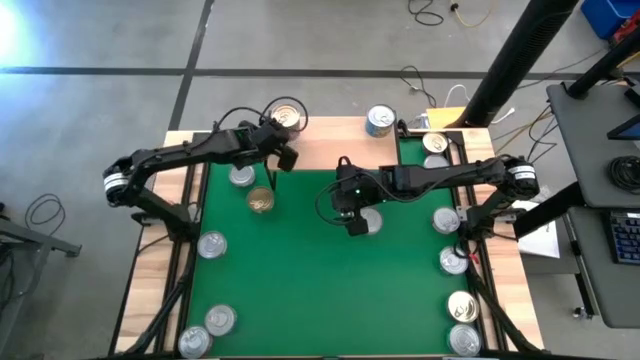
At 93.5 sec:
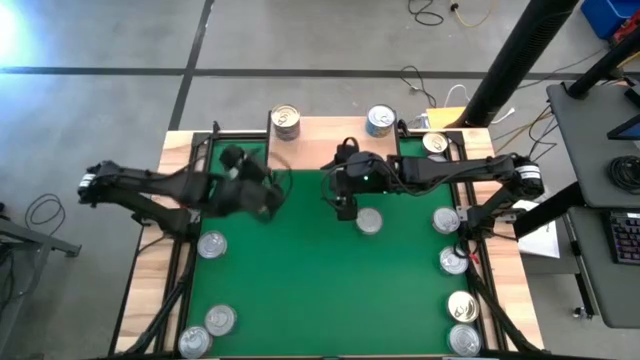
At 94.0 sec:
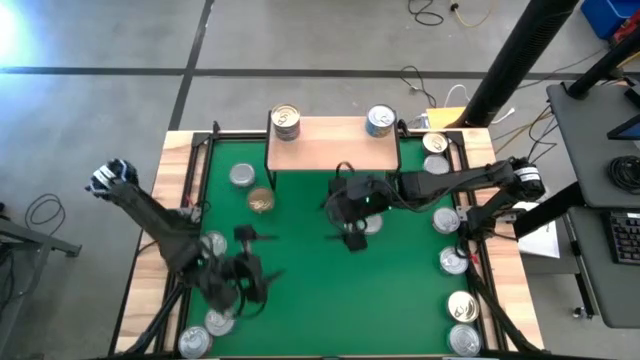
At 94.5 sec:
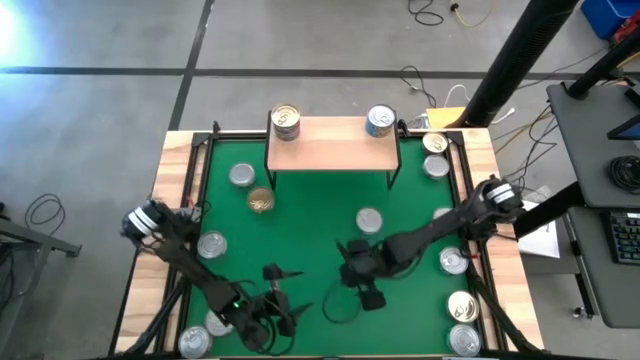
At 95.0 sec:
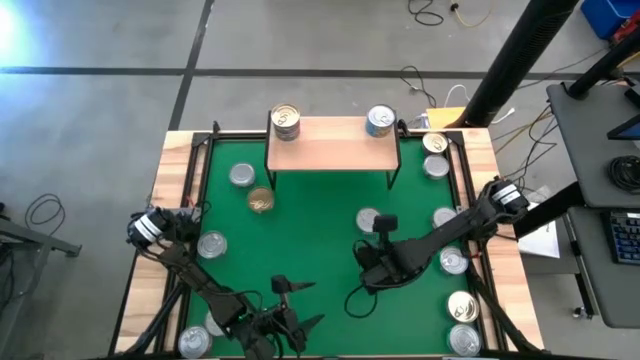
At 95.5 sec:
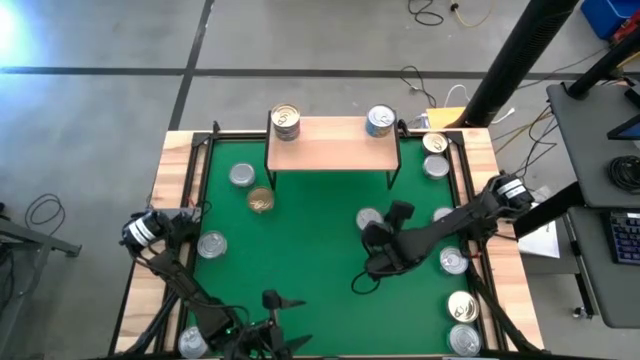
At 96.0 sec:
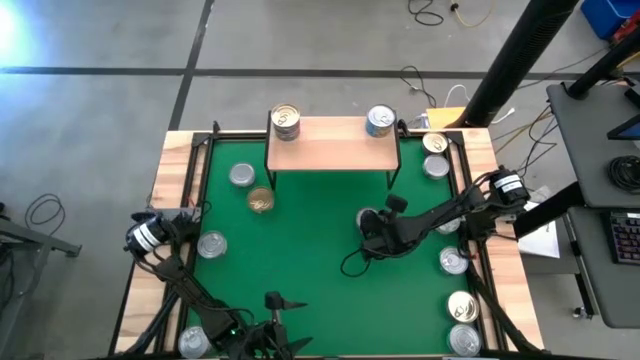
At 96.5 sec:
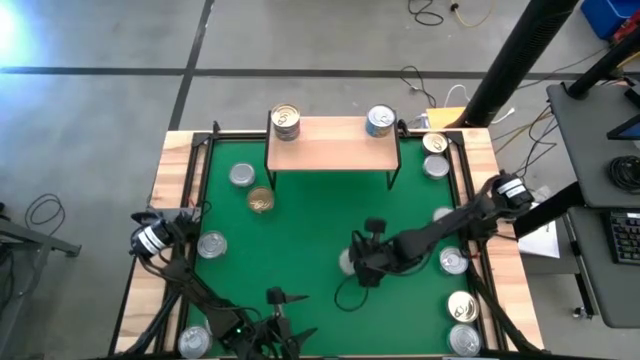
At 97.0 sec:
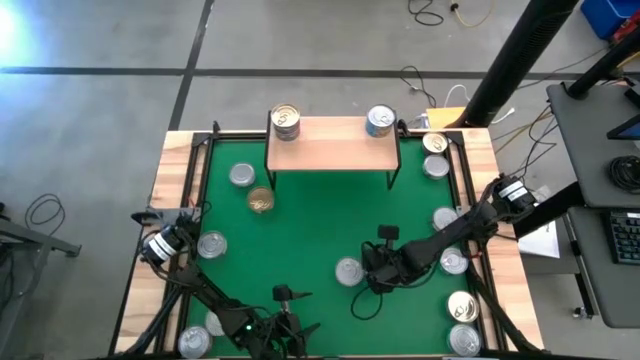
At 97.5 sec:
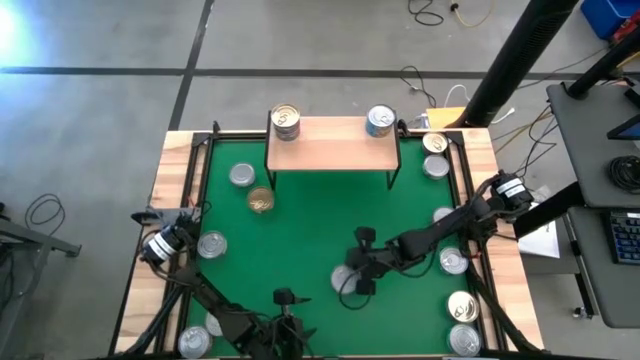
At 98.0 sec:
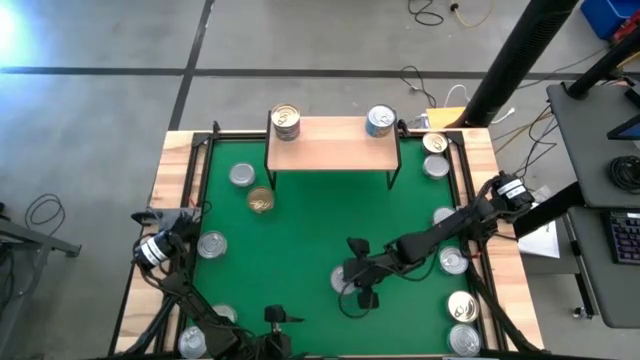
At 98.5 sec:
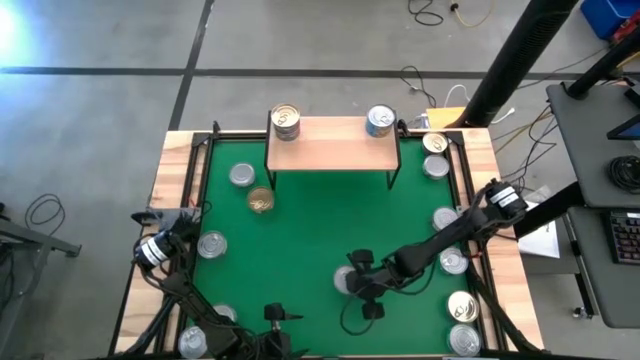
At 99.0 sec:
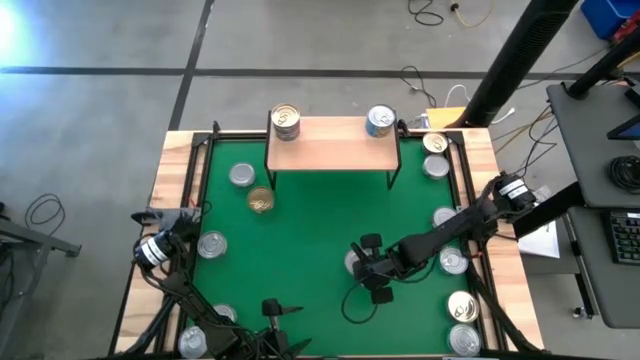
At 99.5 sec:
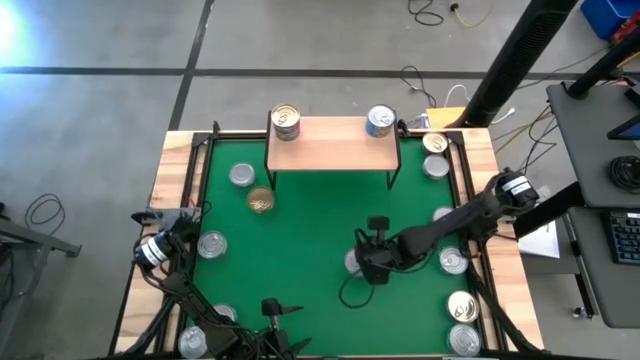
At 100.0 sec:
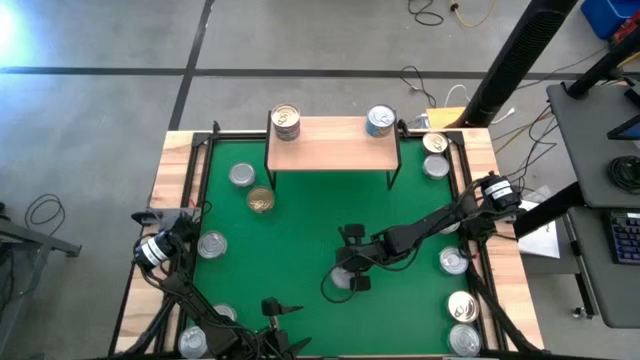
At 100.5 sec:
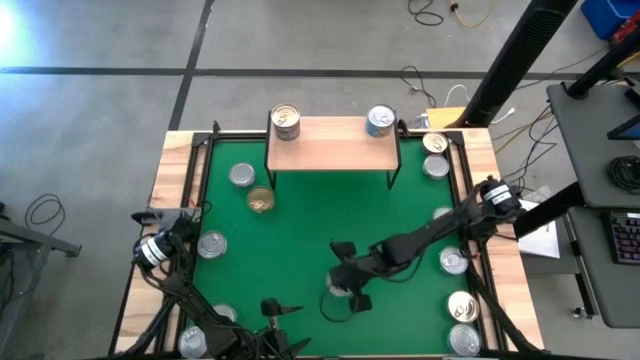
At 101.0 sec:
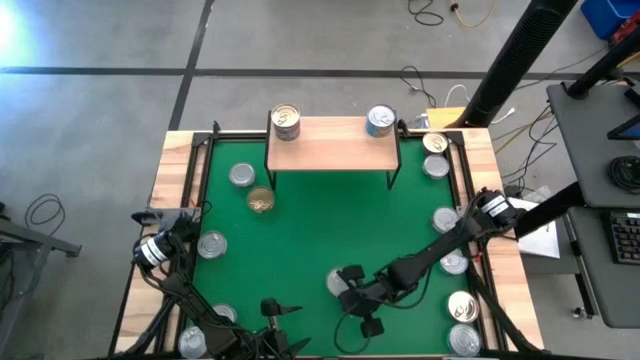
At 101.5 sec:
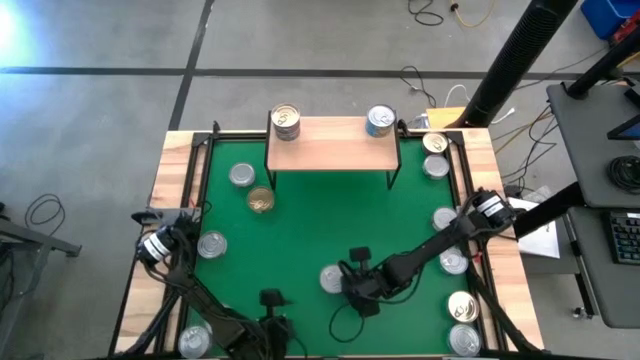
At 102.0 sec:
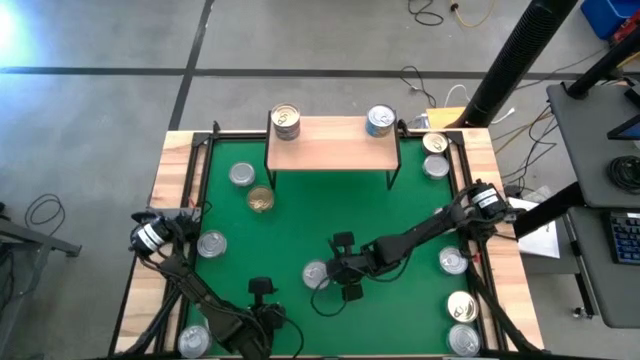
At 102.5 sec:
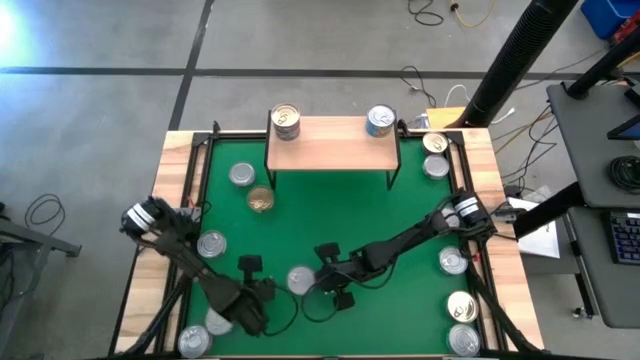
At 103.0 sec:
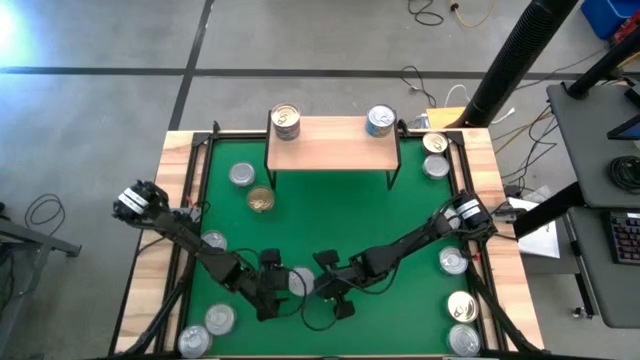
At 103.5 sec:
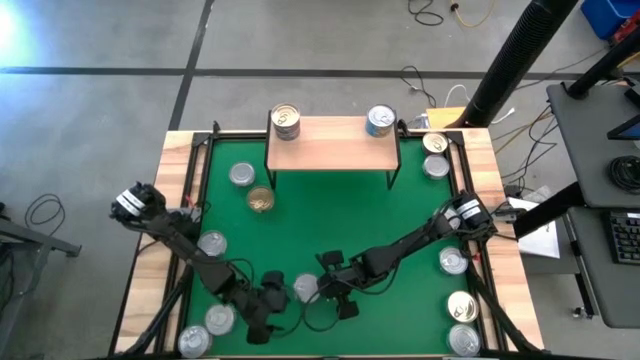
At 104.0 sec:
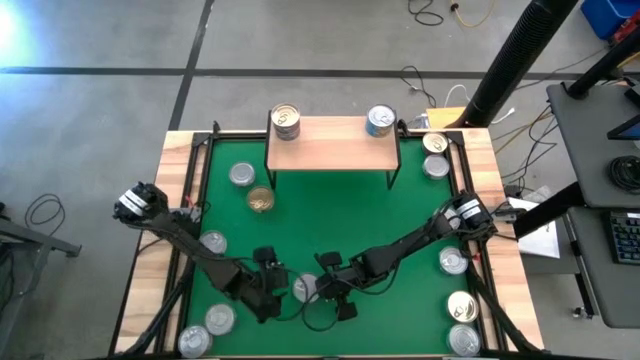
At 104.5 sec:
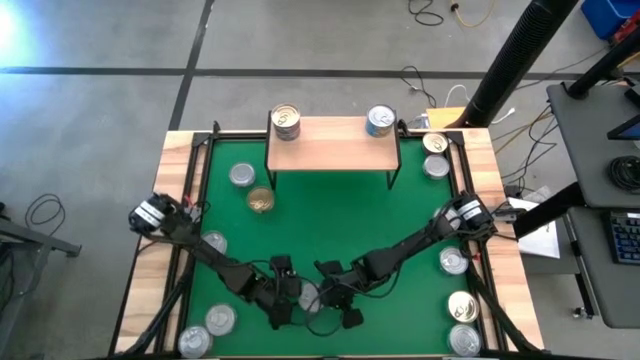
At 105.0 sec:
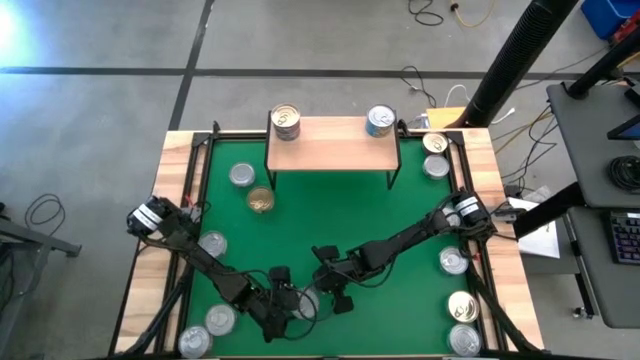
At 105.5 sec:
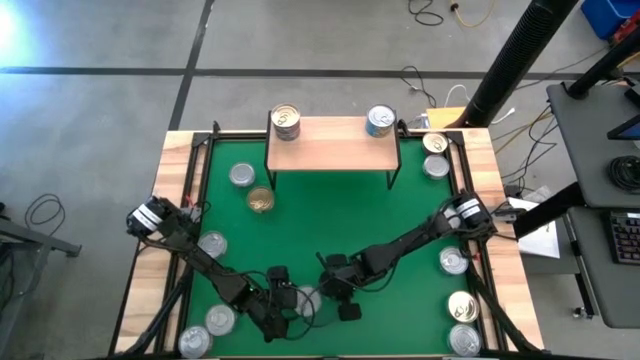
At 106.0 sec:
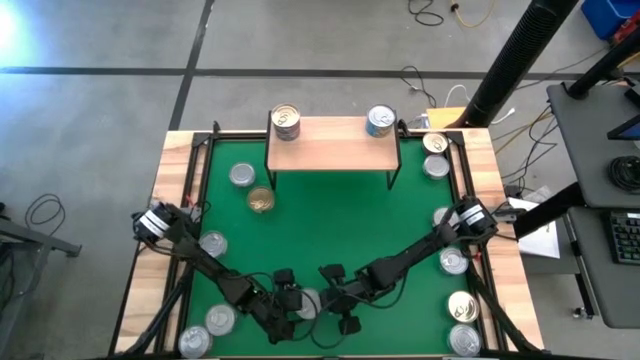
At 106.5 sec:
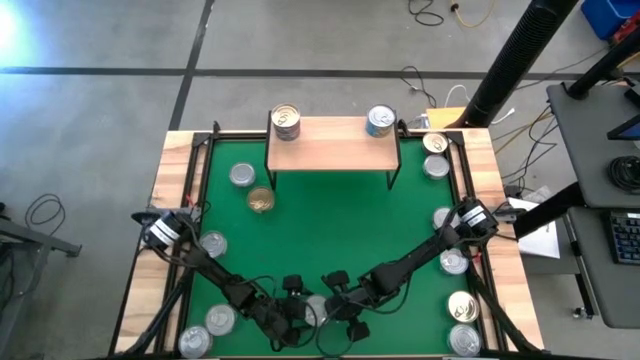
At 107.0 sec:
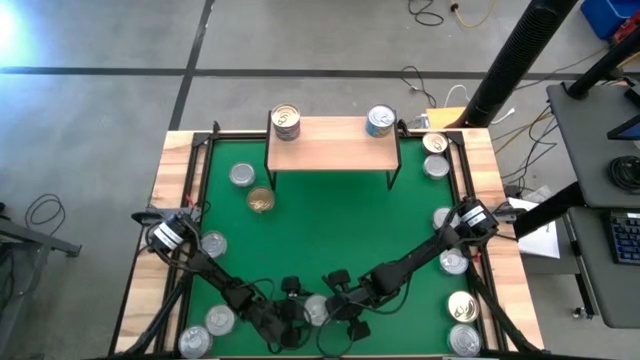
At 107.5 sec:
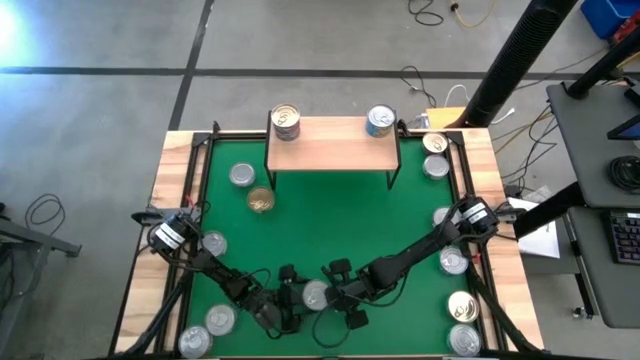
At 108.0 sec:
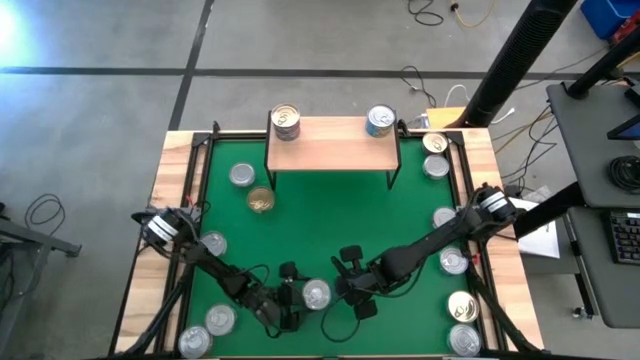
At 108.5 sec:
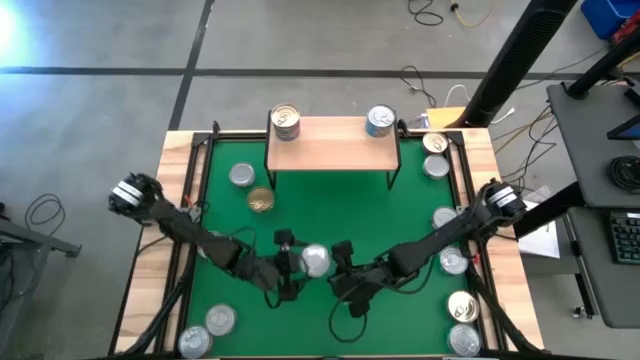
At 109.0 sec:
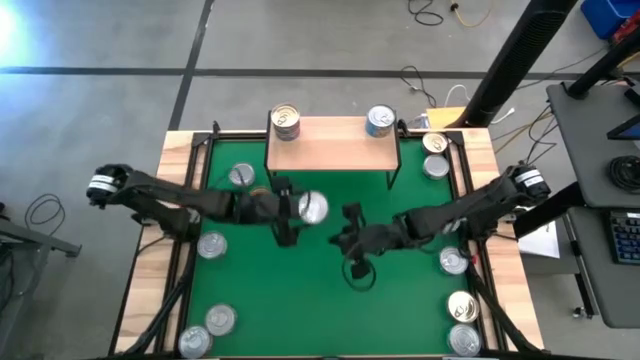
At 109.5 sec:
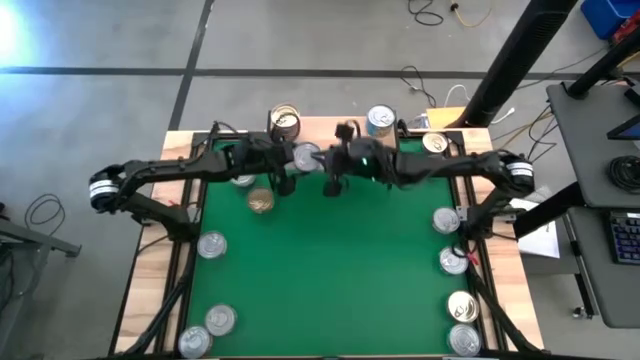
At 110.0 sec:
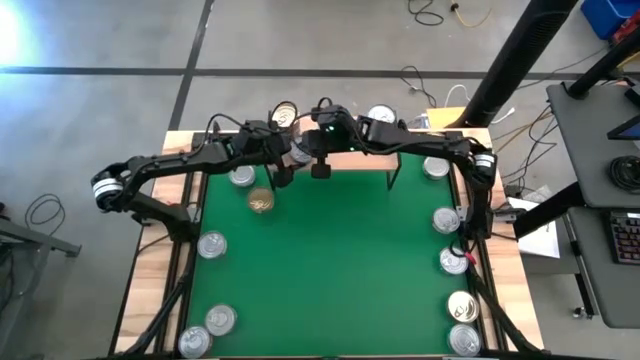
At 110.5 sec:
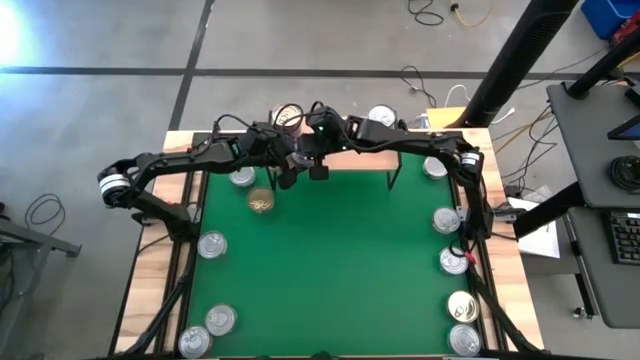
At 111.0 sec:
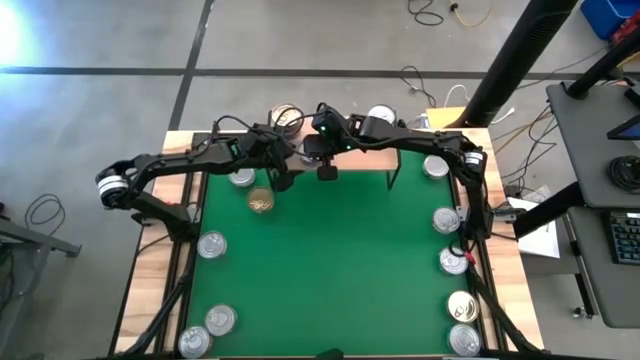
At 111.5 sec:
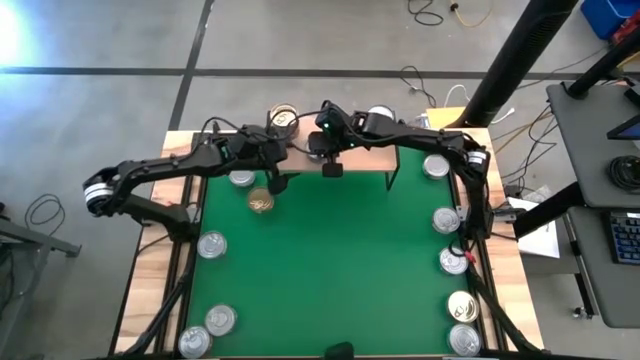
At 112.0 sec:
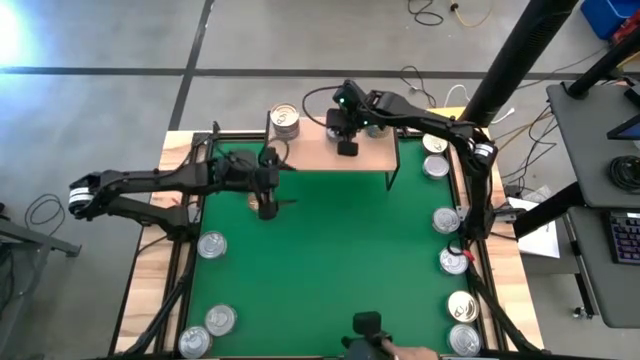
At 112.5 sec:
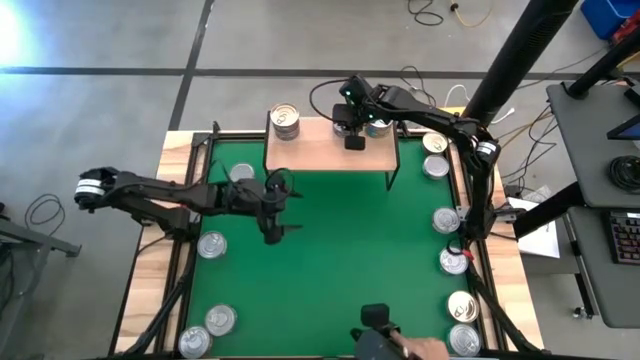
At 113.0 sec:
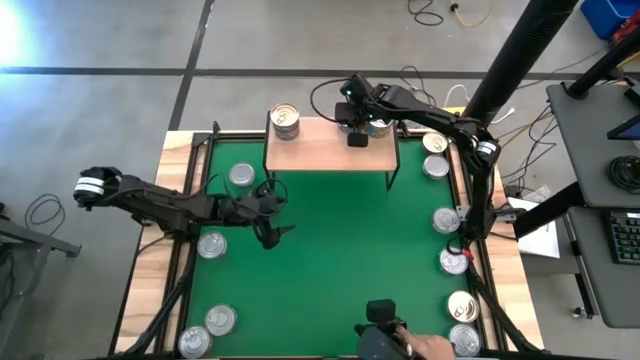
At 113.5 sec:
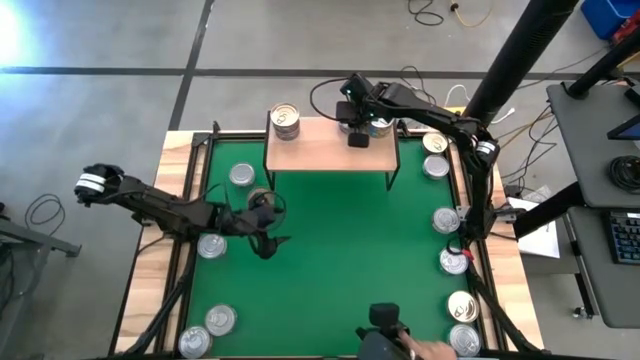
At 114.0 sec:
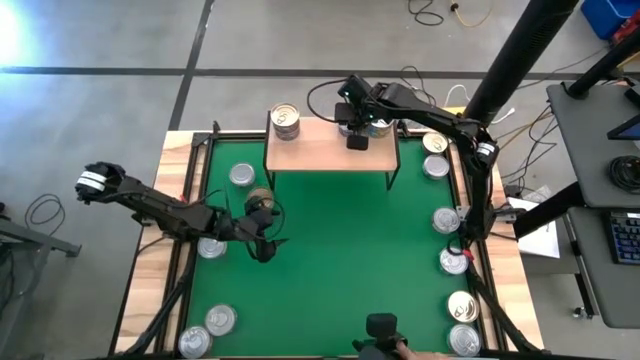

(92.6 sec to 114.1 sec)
Task: Stack canned seafood by type on shelf
Put the top blue tuna can on the shelf
